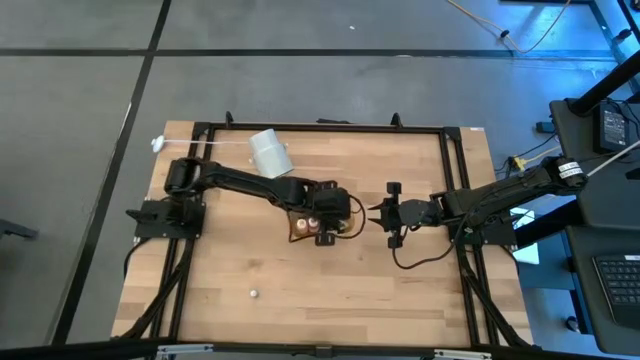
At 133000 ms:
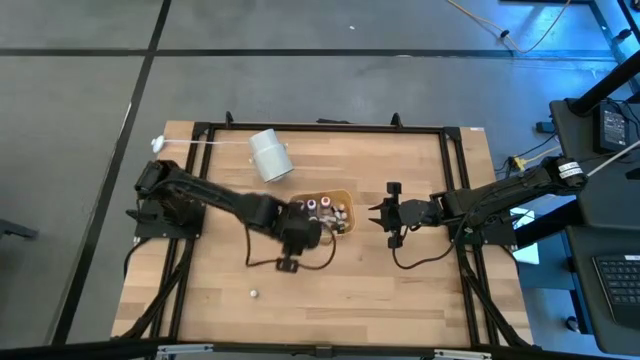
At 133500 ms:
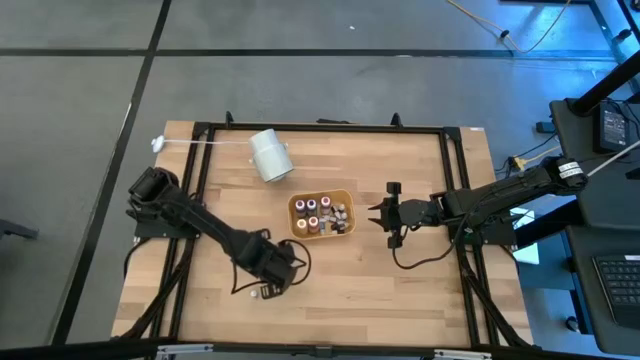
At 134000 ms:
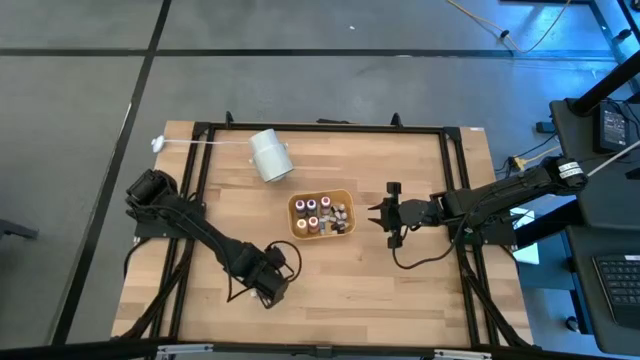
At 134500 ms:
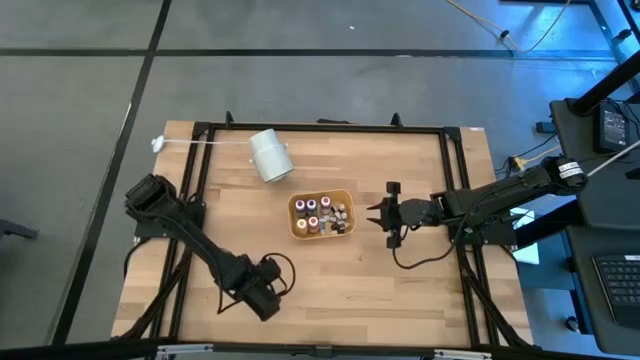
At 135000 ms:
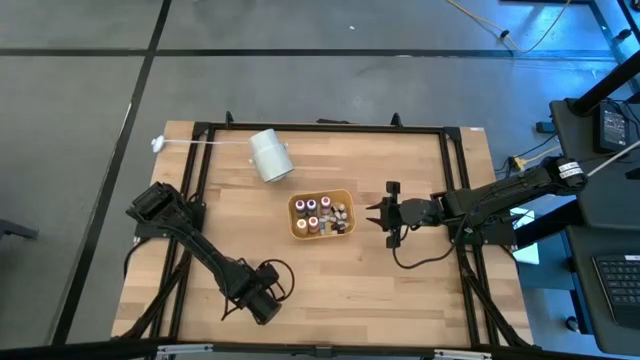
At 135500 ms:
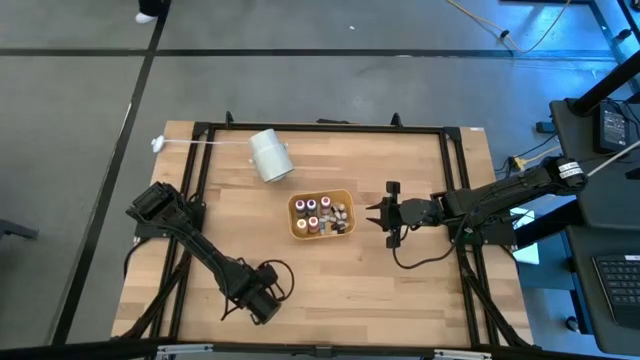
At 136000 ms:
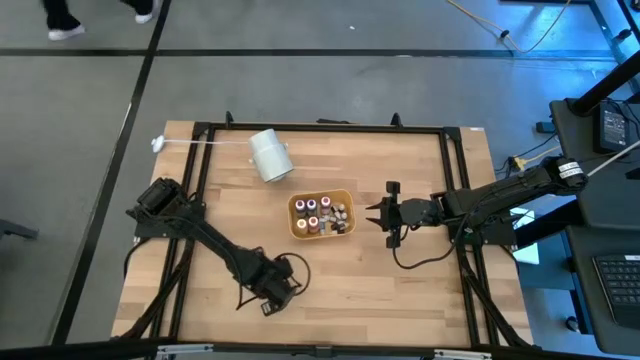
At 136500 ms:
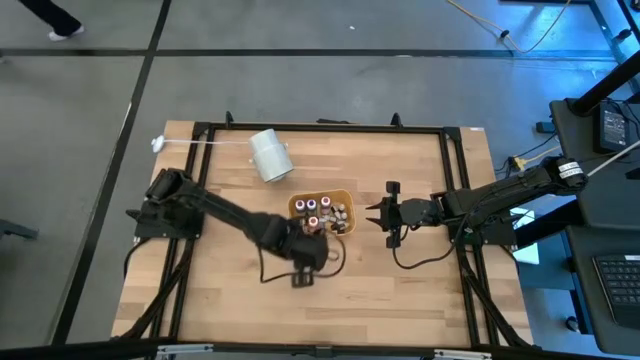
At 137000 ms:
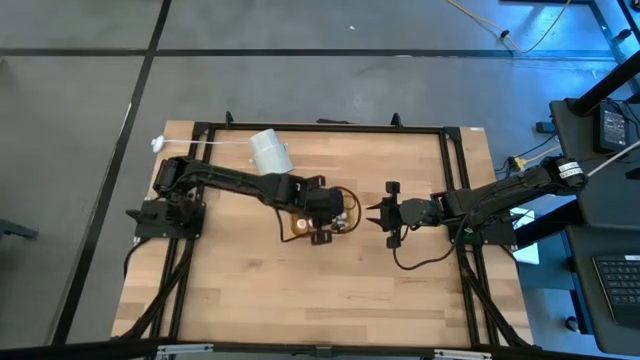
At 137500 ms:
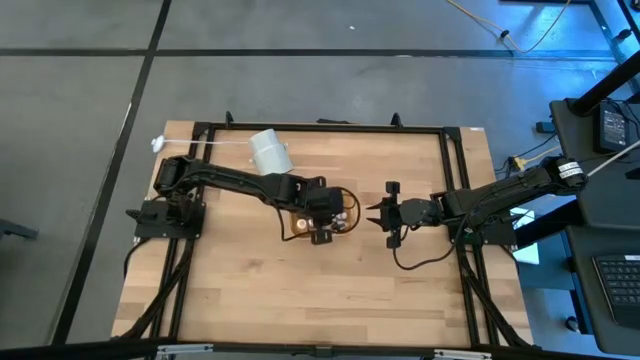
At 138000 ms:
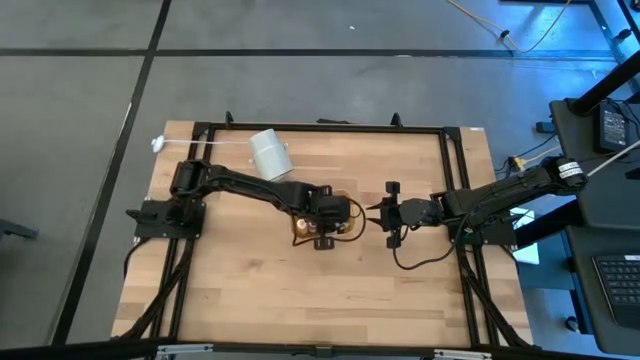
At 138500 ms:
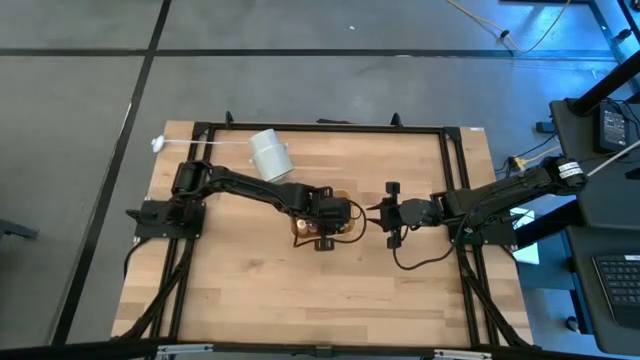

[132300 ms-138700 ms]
Task: Pick & Place food coloring
Put the small black ink bottle into the yellow bin

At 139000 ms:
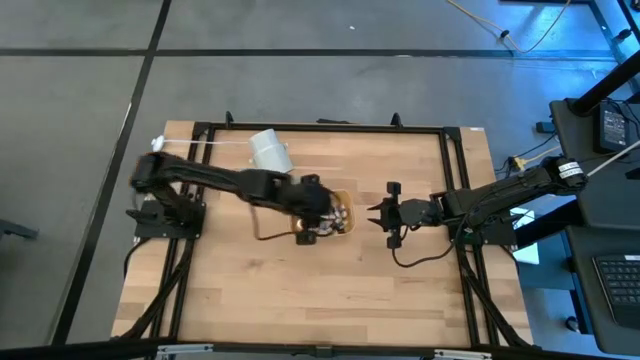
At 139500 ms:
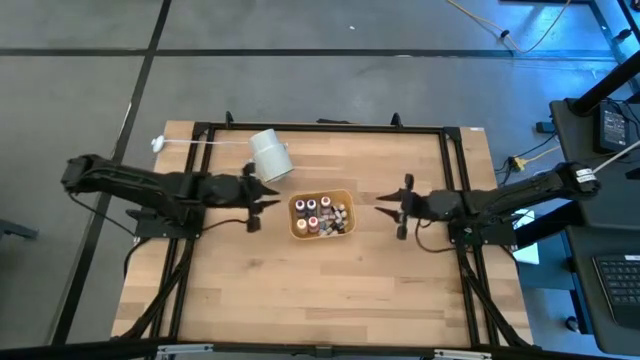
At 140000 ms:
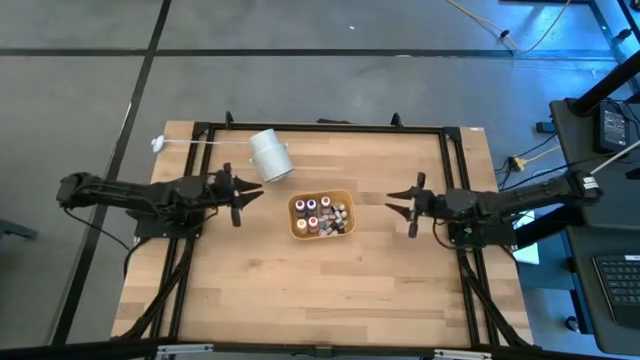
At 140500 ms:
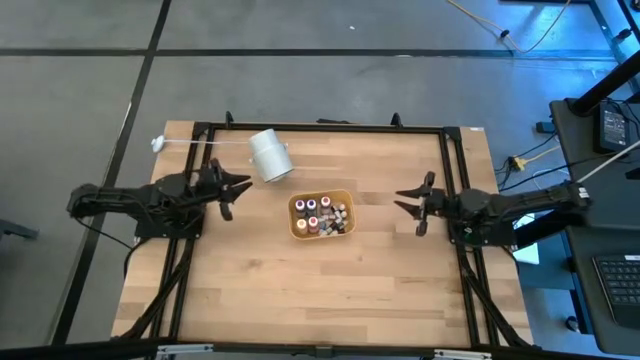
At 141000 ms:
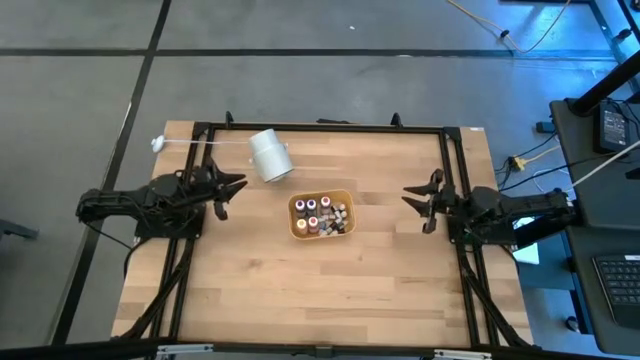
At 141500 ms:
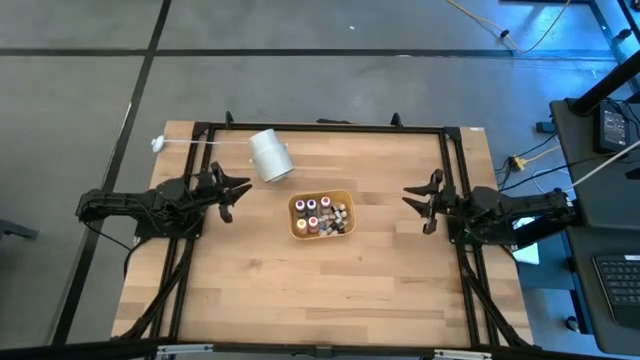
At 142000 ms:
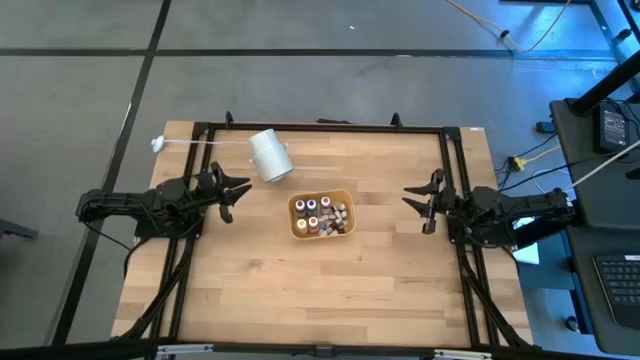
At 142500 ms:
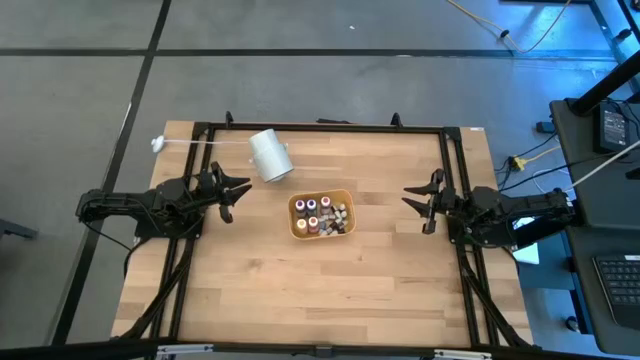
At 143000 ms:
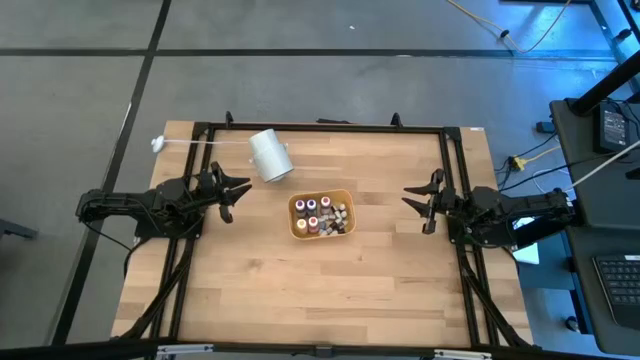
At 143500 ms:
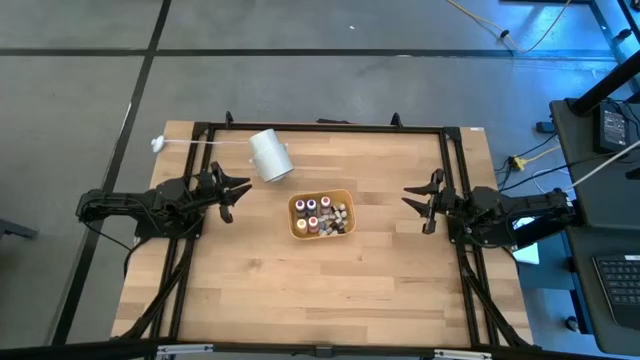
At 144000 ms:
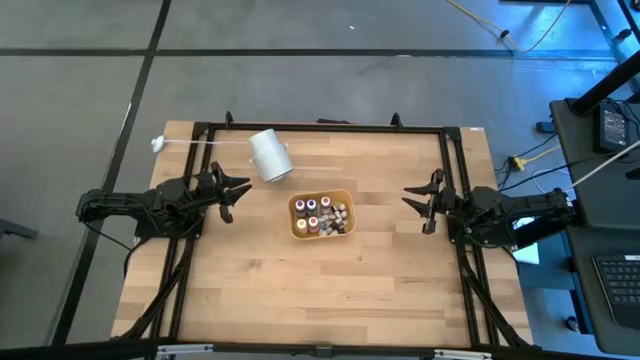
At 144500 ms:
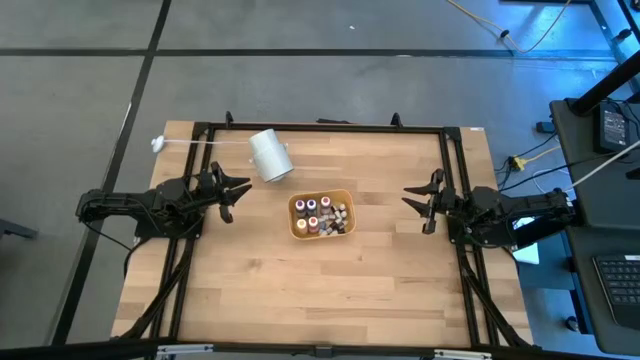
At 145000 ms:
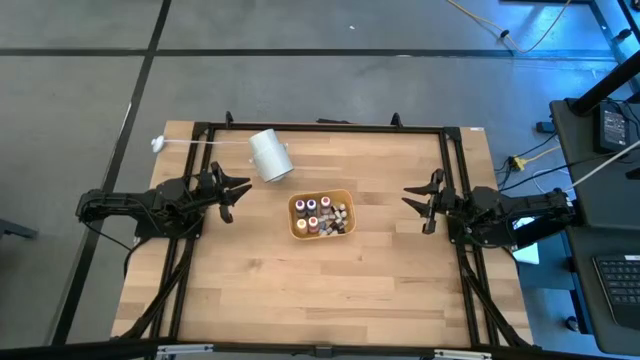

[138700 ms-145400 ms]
Return to Home Position
